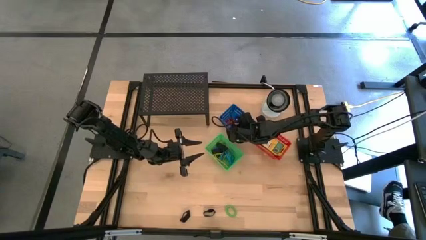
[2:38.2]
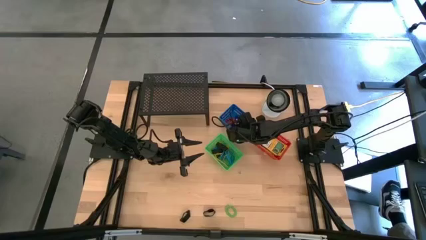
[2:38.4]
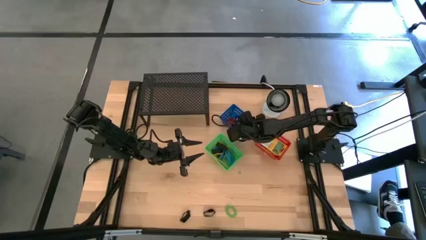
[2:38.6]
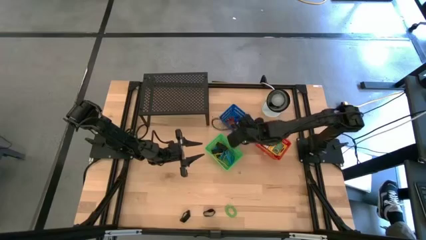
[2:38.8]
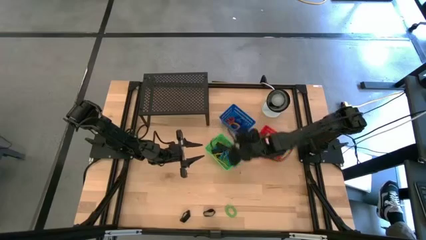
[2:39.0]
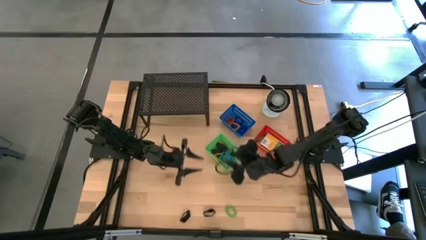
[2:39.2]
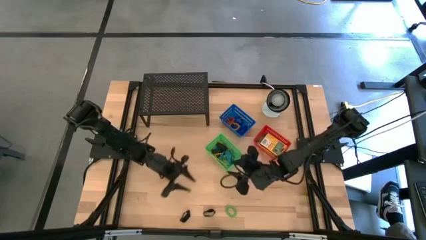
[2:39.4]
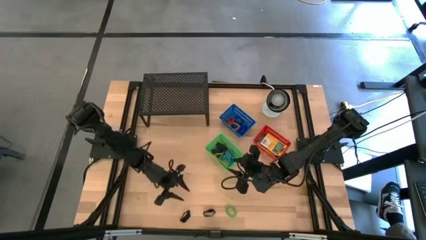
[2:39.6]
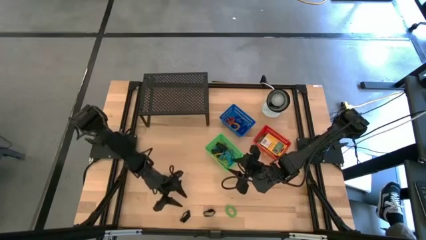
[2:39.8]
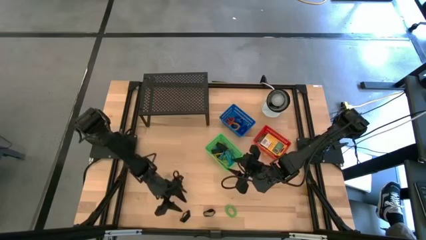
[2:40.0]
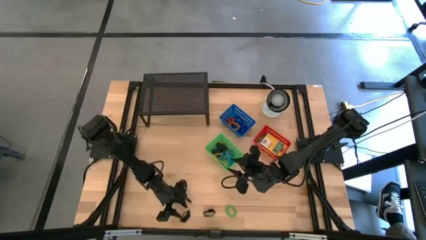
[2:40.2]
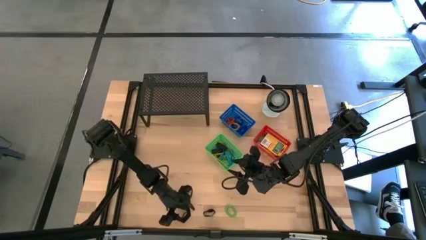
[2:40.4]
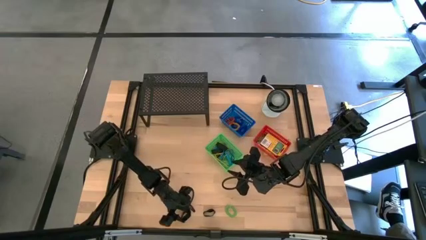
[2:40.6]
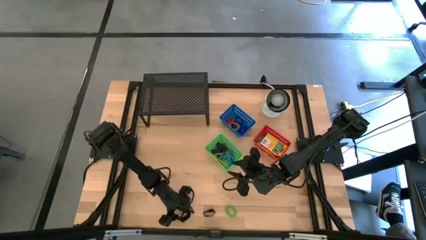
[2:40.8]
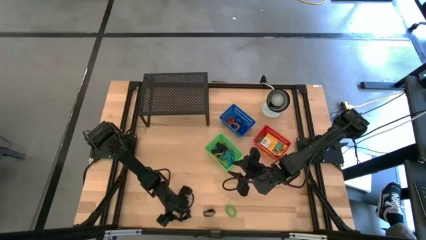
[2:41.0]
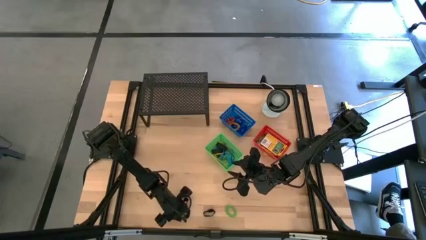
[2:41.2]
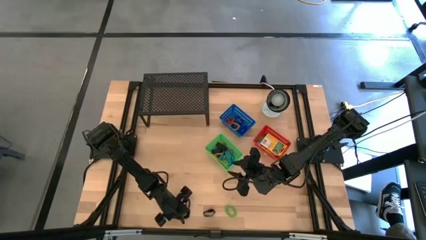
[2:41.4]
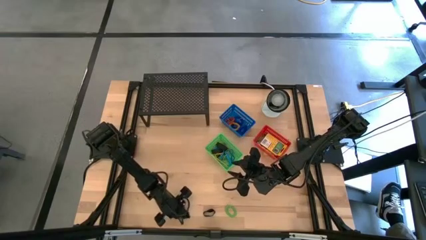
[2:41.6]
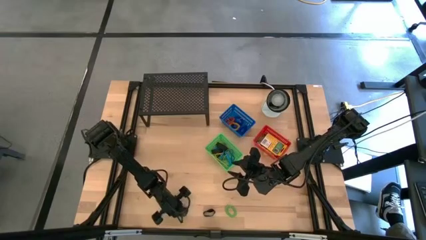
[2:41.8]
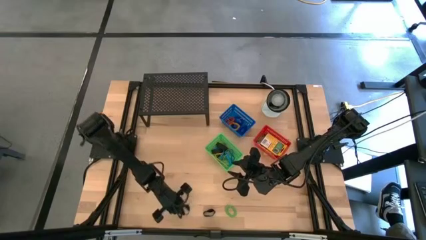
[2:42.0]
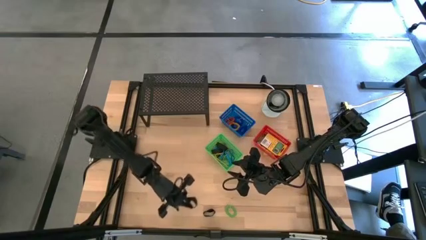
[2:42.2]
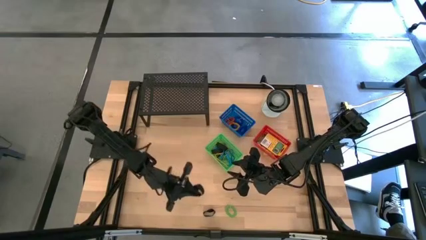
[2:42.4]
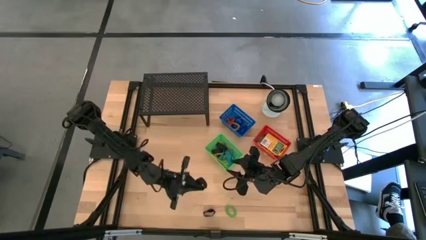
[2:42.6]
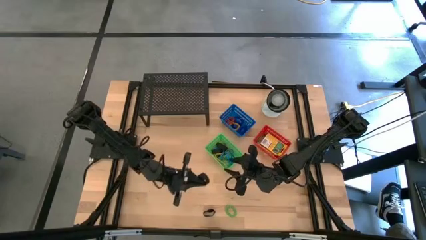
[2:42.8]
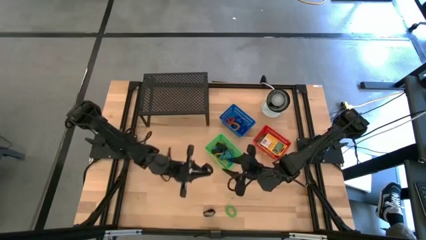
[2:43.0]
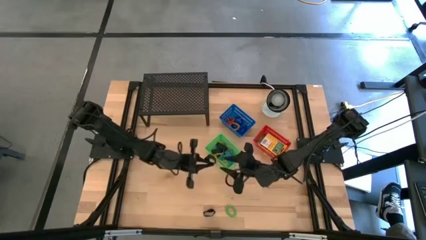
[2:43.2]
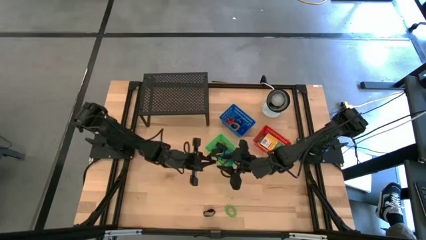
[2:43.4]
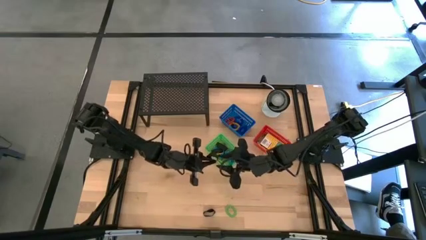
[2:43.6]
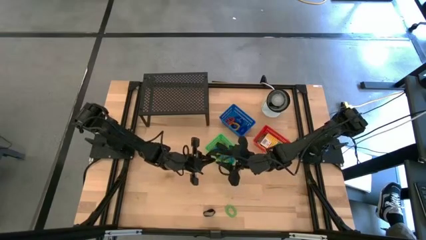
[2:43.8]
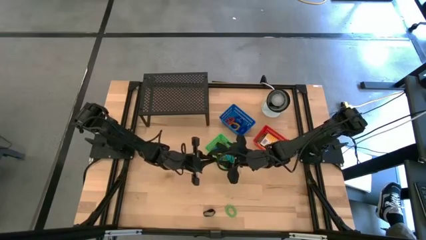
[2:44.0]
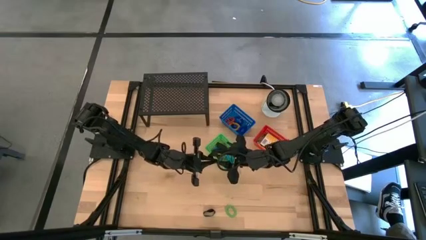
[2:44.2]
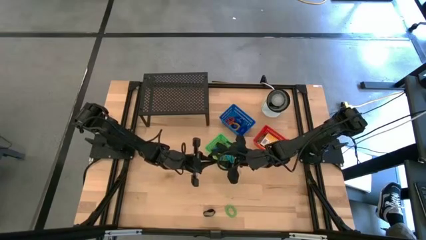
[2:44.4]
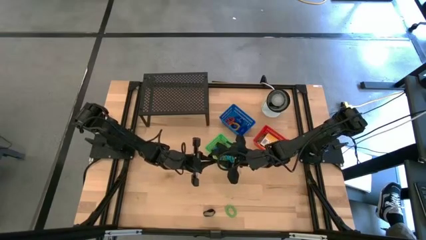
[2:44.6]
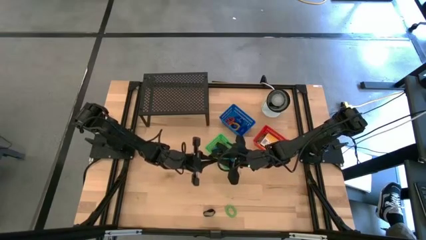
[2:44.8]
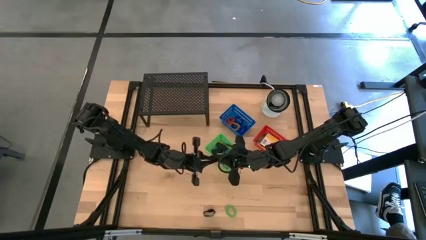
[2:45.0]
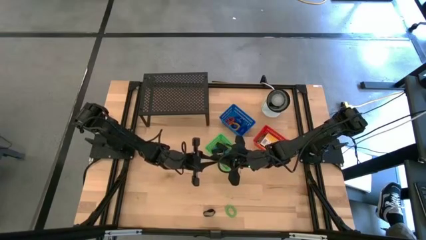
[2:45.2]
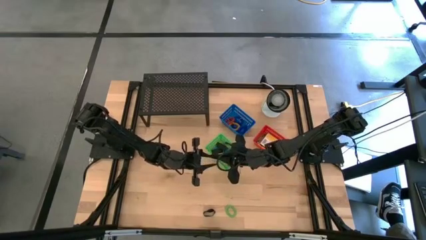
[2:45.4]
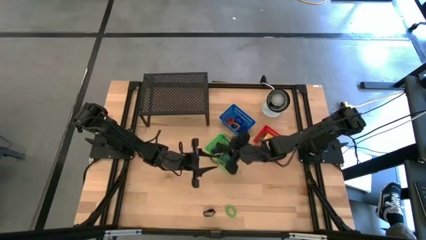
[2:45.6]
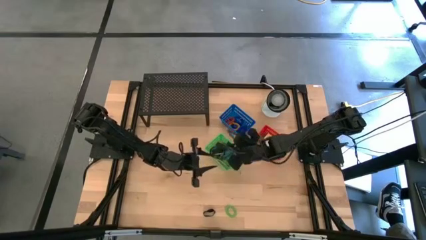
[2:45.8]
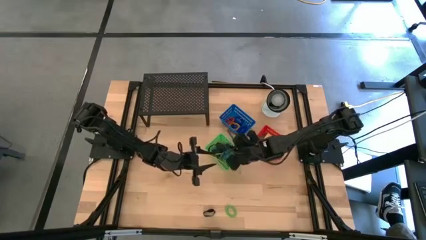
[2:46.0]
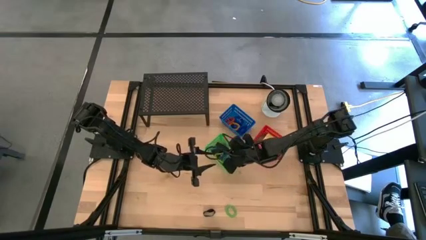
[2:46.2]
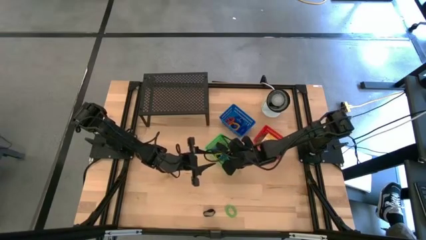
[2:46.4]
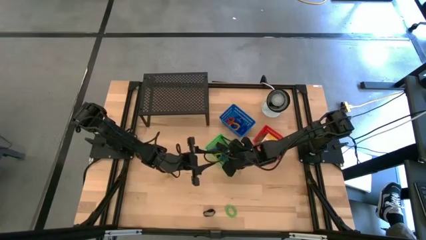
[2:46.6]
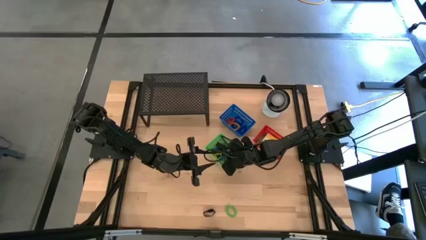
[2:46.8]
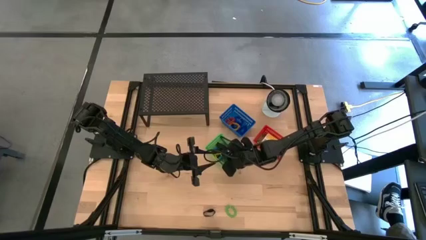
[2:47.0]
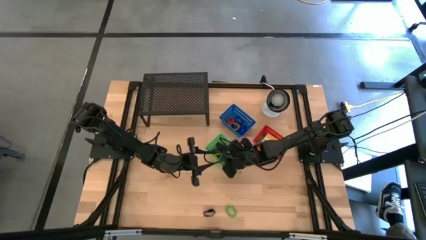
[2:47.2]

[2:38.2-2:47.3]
Task: Pick & Place Office Desk Supplies
Put the black rubber band into the green basket

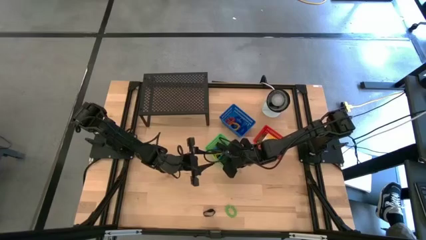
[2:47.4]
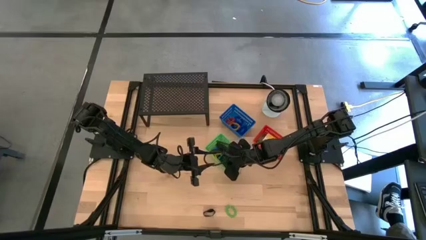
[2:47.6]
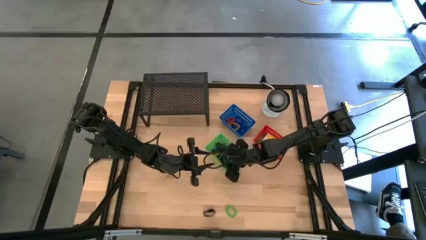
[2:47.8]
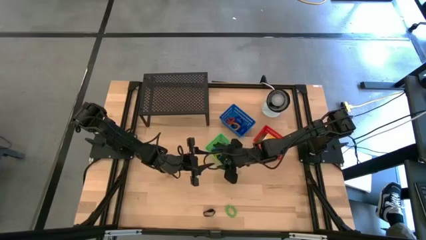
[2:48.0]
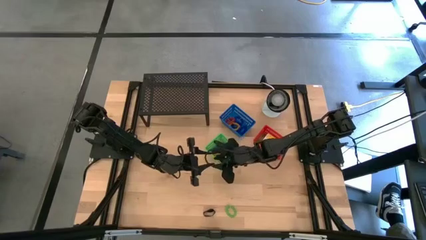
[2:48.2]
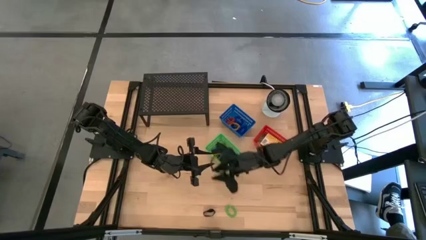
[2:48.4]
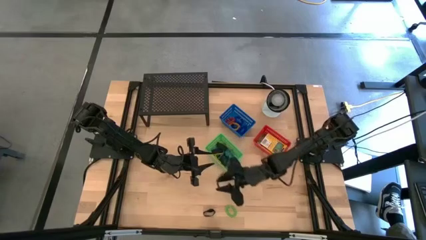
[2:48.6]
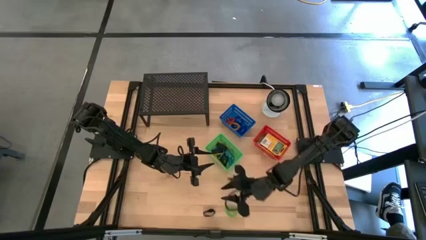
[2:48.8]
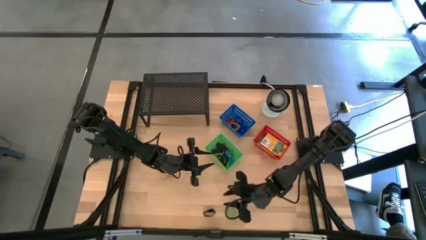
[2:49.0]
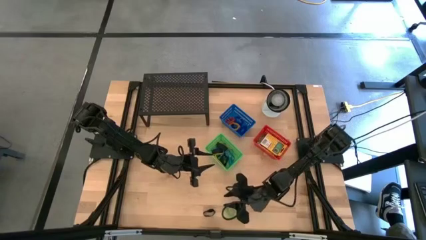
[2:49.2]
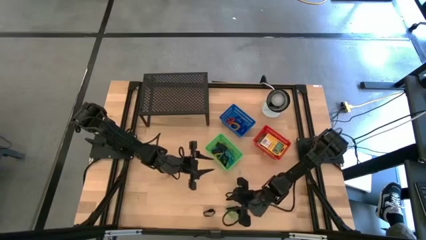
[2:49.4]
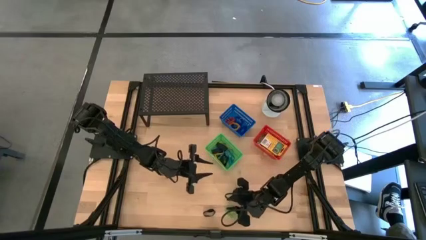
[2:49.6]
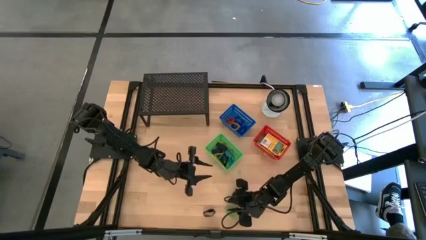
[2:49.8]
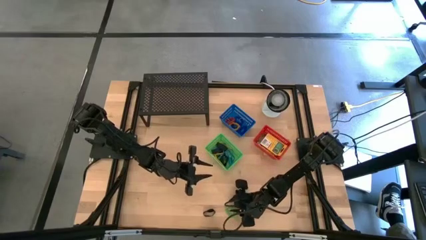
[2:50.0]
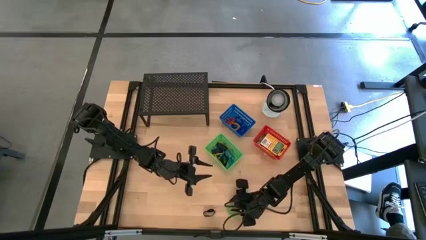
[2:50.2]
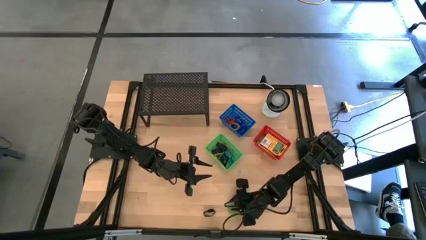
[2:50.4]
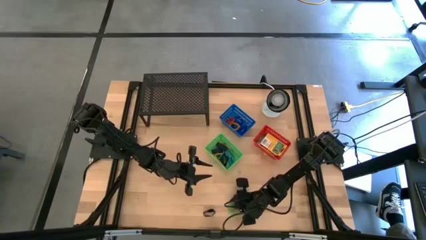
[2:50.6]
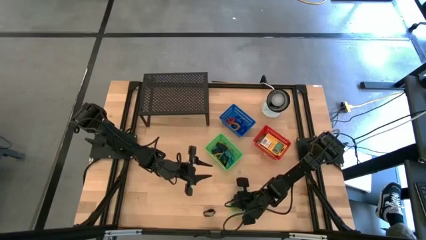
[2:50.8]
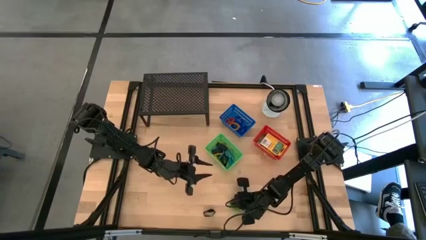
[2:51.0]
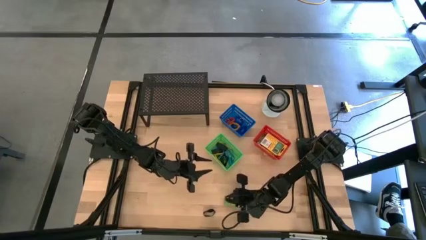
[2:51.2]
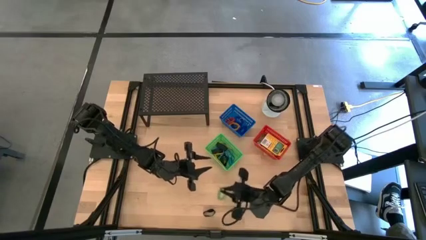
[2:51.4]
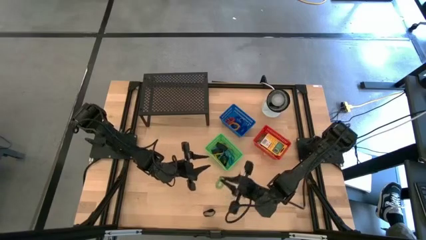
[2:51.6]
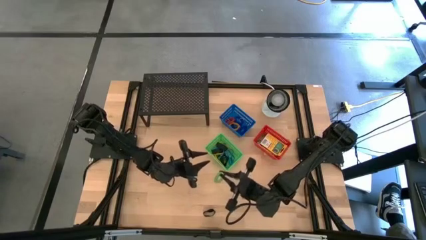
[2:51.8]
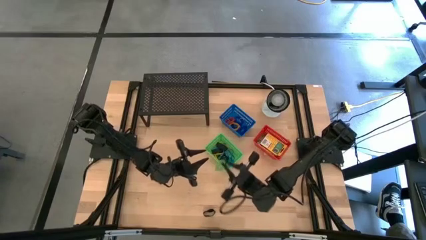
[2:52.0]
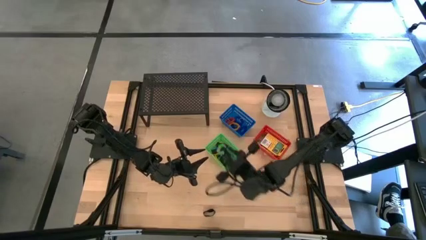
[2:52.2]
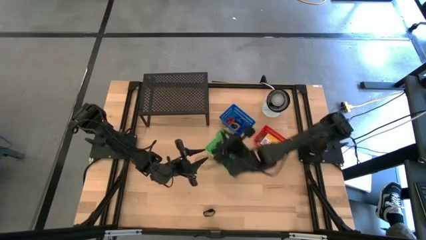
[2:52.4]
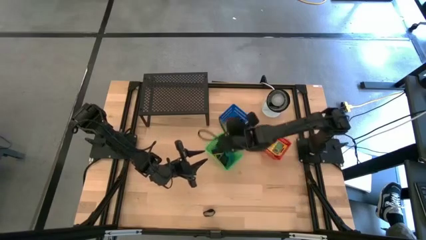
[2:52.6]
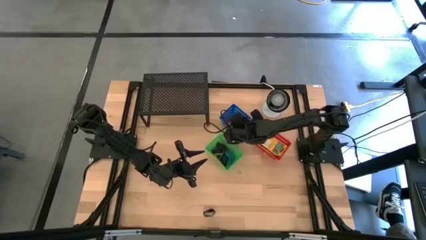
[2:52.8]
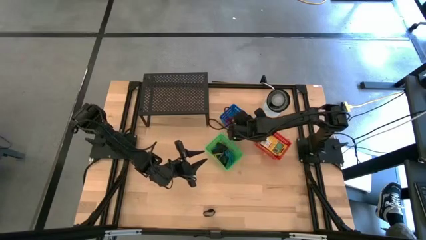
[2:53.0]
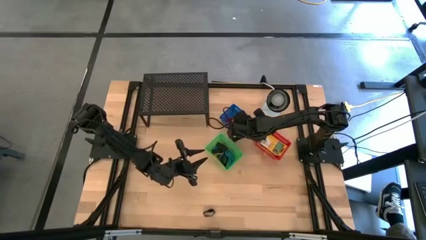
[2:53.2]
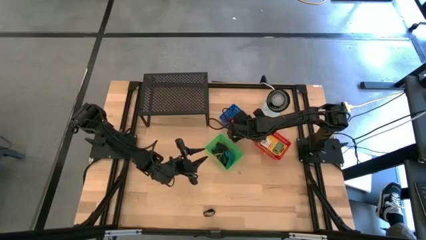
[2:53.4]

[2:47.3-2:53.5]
Put the green spring keychain into the blue basket
